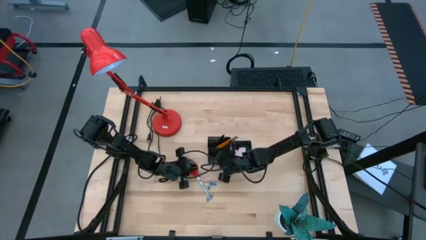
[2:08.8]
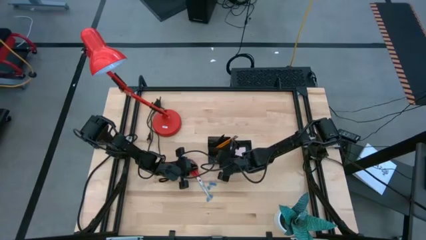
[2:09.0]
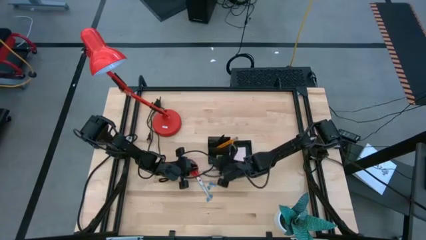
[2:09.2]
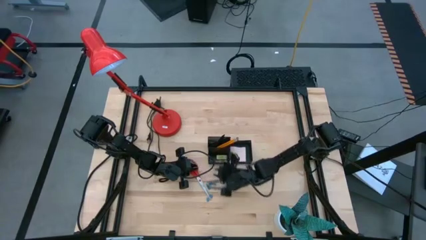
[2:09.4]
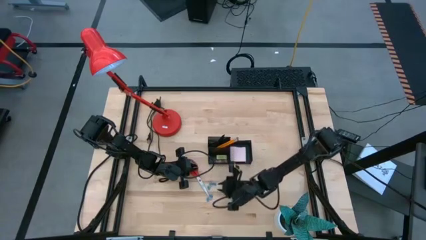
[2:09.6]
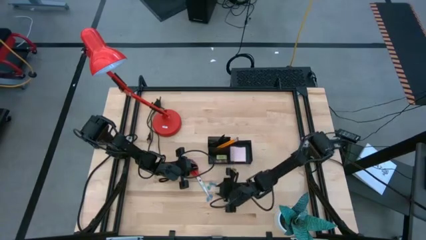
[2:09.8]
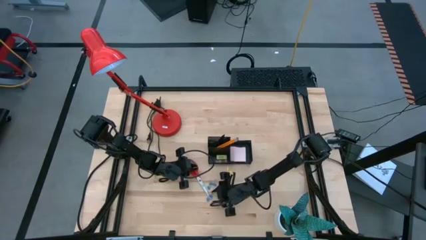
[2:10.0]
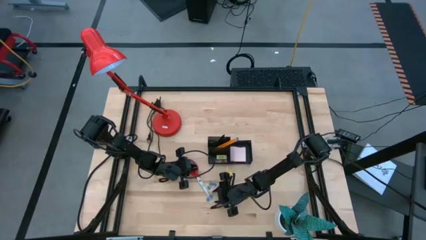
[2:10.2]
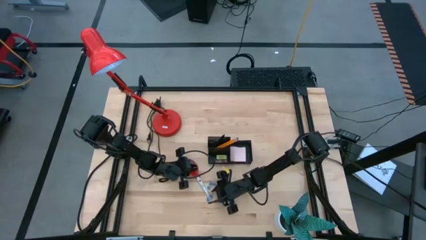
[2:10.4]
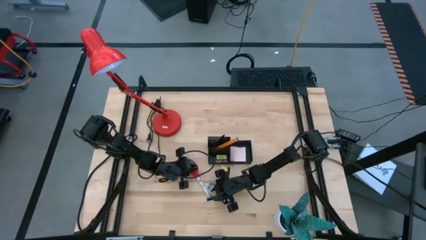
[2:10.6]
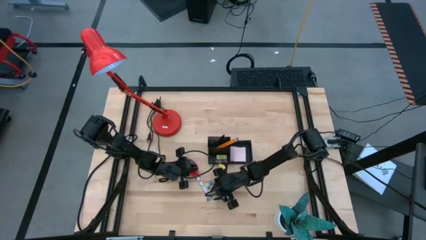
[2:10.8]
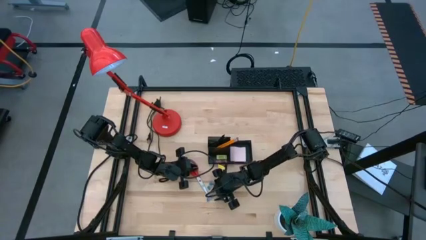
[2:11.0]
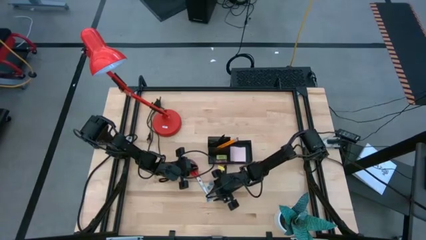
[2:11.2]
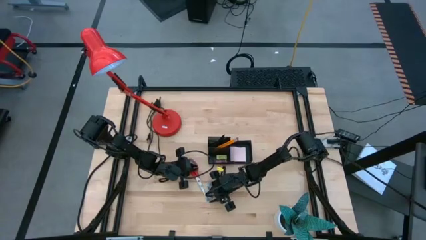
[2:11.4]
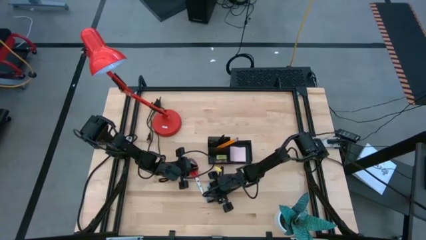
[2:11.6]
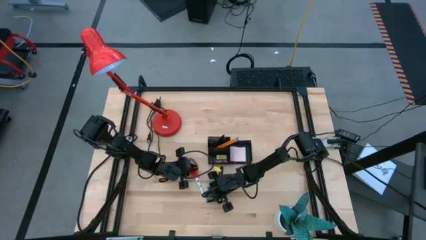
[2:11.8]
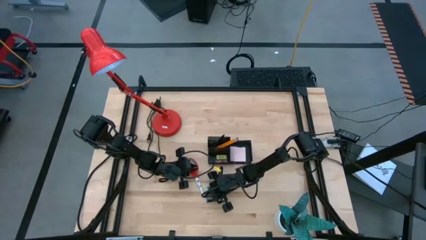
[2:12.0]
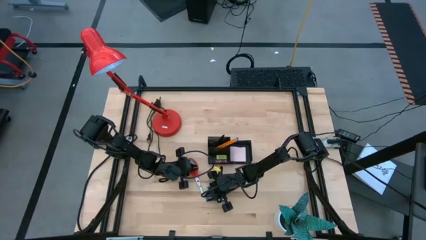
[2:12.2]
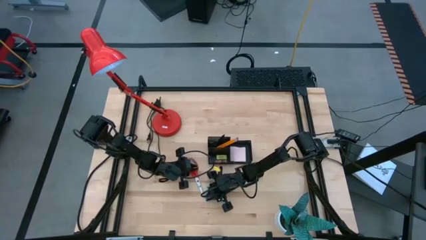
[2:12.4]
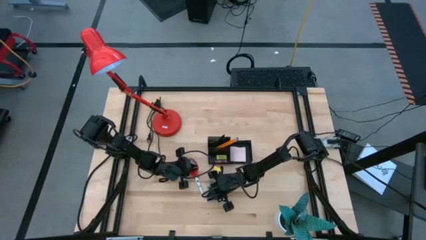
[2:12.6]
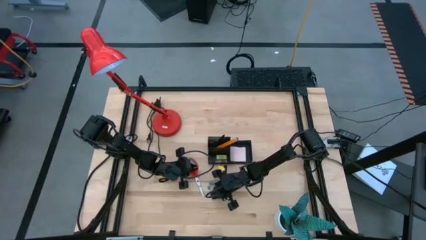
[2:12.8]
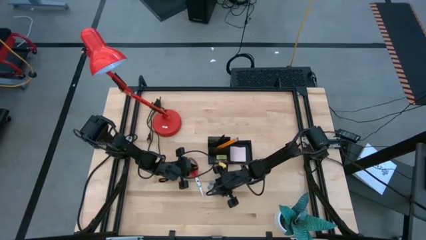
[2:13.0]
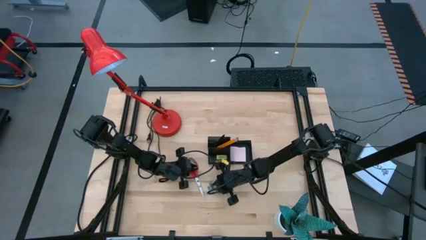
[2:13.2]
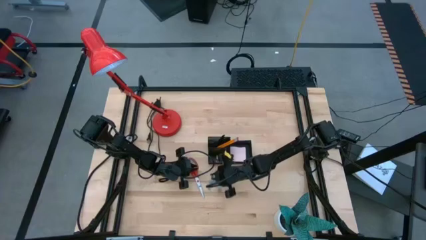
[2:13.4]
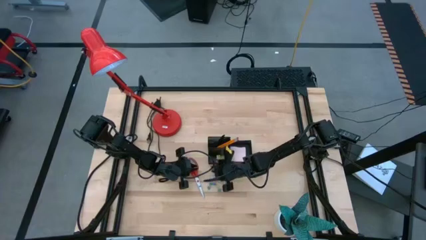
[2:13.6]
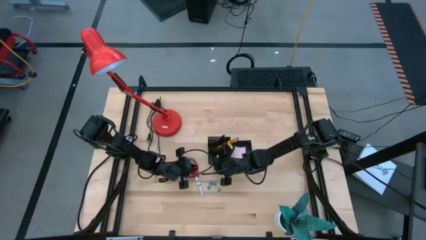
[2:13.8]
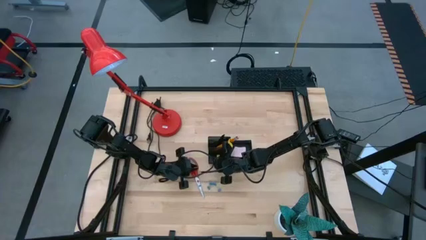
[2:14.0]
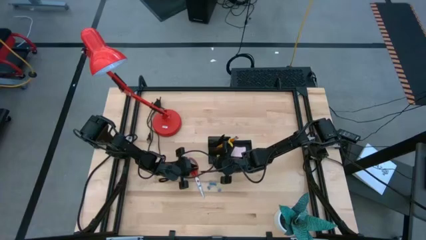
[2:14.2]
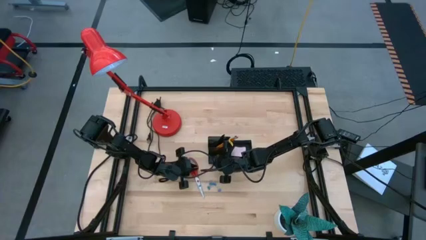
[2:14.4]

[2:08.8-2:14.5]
Task: Pick and place office supplies into organizer
Put the blue binder clip into the black desk organizer

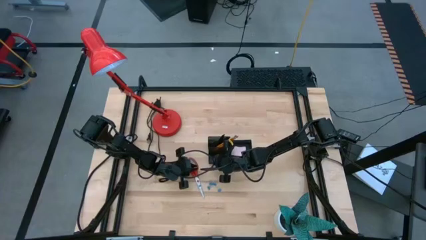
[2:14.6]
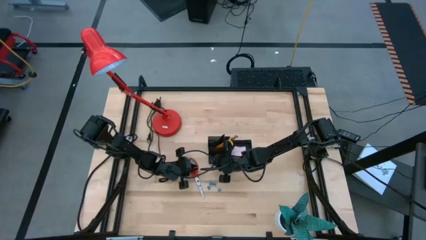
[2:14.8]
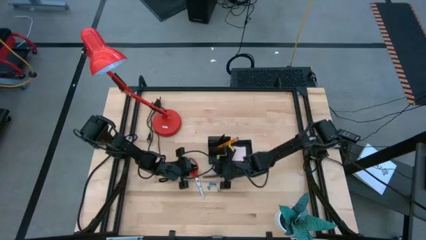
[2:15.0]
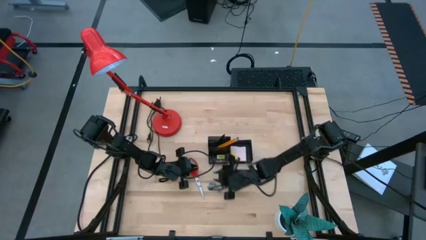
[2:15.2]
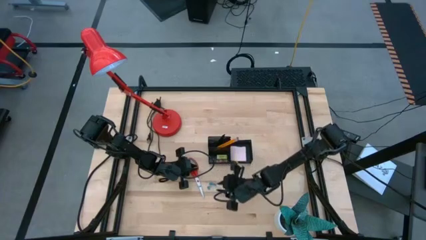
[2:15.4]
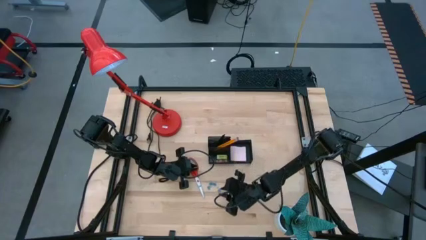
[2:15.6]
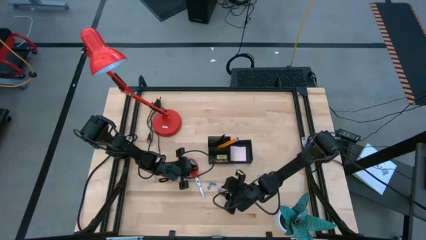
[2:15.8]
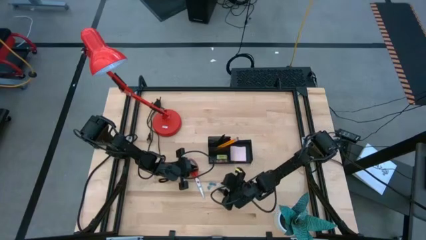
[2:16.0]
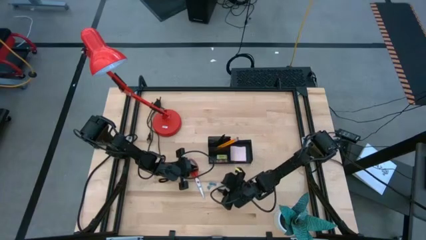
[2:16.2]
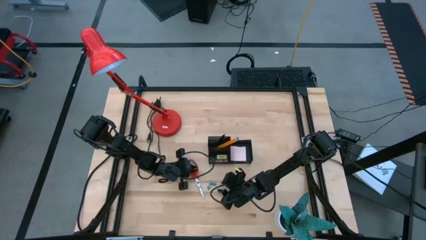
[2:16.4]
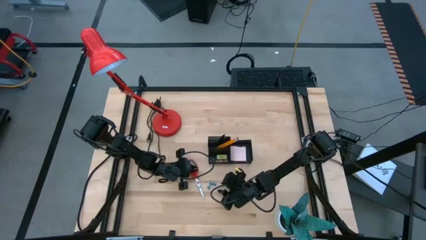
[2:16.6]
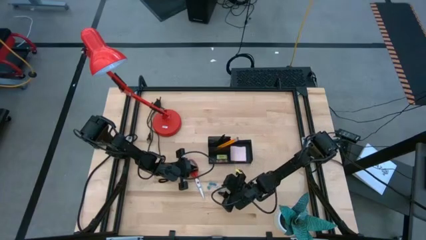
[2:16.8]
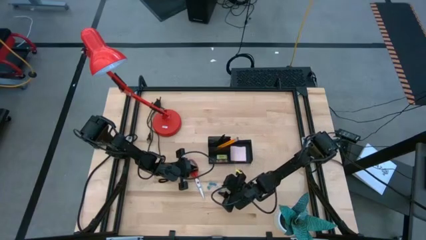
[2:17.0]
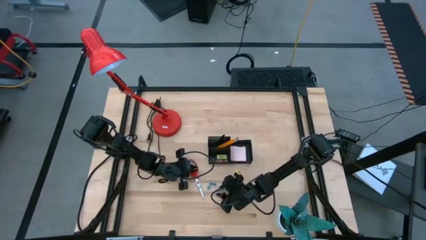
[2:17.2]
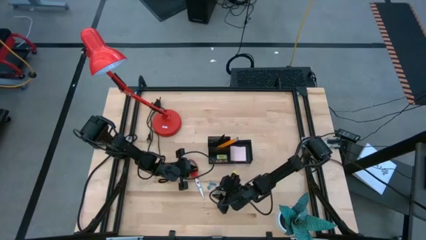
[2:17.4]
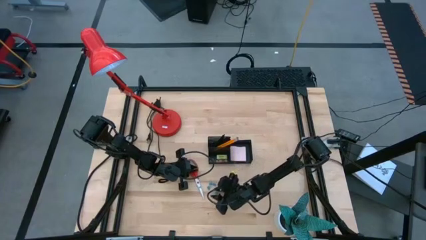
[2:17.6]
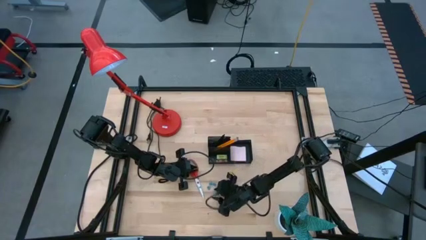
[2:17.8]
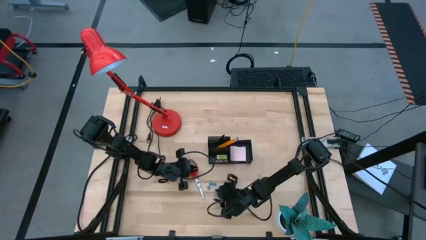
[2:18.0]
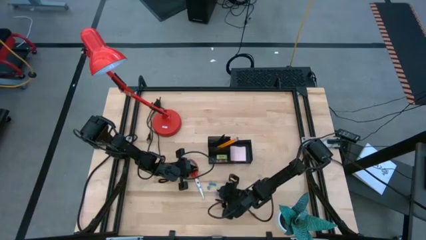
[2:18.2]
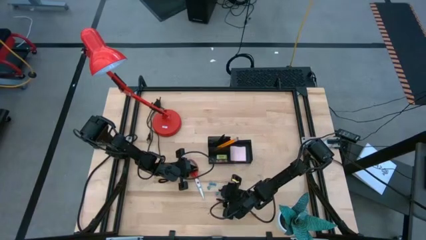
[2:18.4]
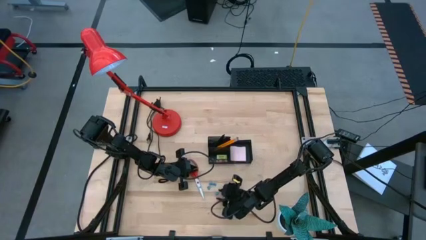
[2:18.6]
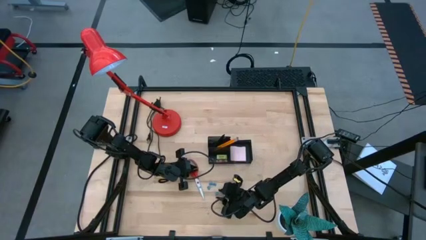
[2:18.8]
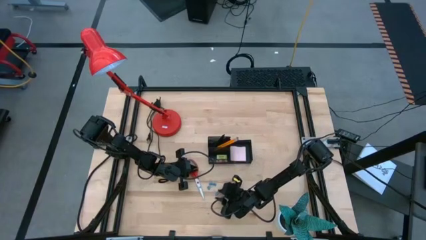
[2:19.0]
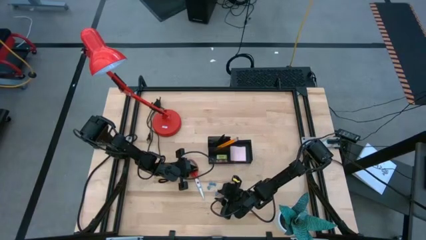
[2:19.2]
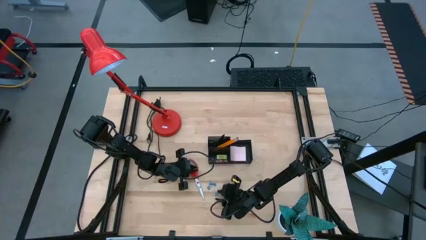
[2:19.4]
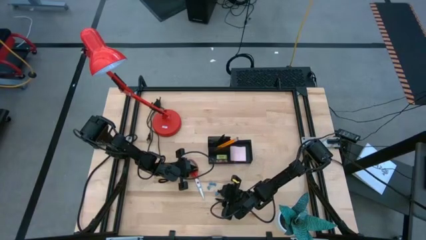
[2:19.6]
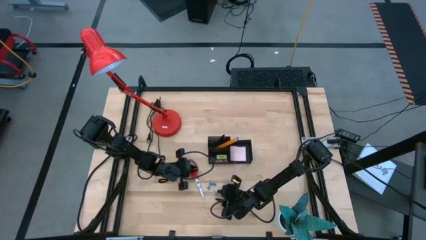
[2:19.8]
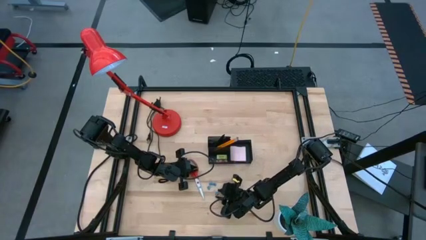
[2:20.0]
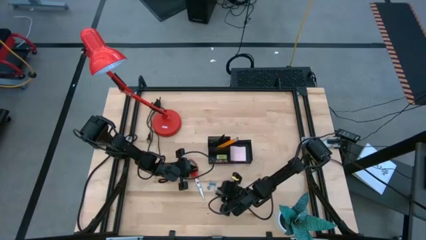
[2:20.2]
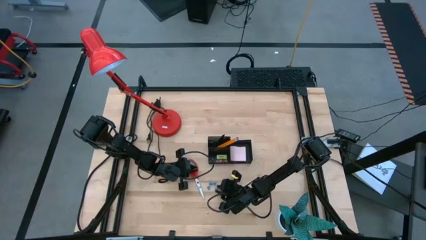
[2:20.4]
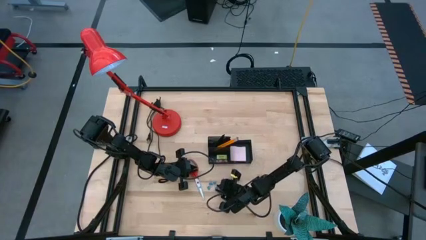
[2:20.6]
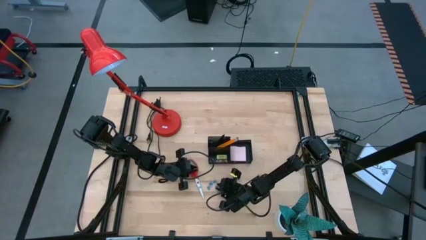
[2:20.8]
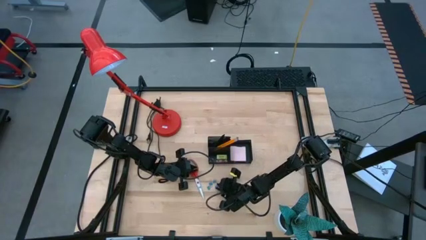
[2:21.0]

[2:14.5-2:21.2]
Put the blue binder clip into the black desk organizer

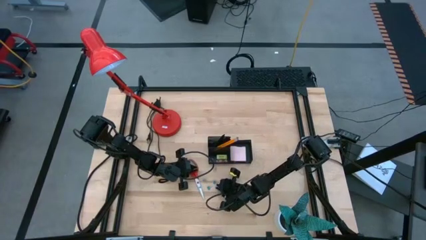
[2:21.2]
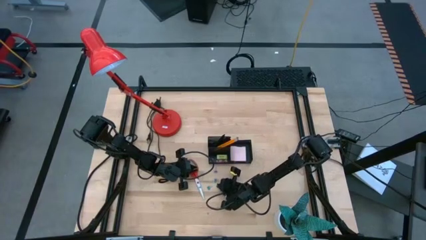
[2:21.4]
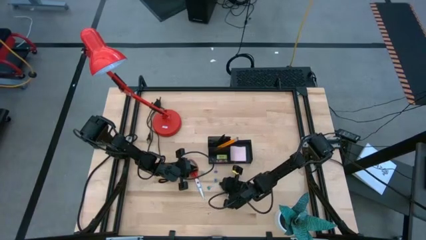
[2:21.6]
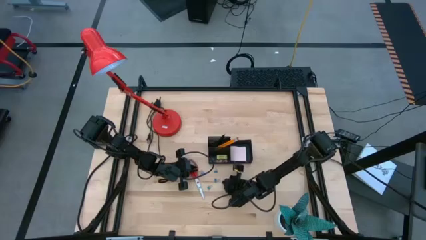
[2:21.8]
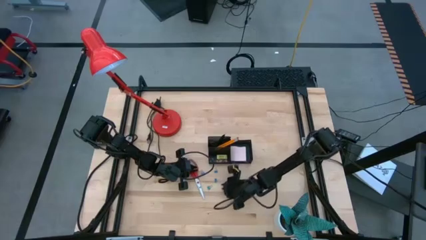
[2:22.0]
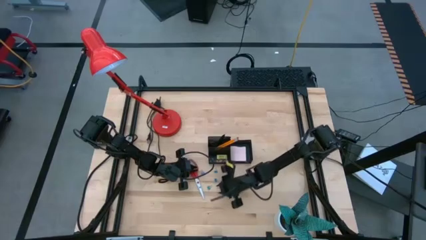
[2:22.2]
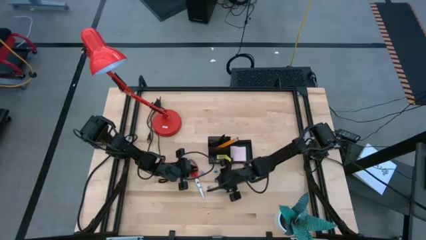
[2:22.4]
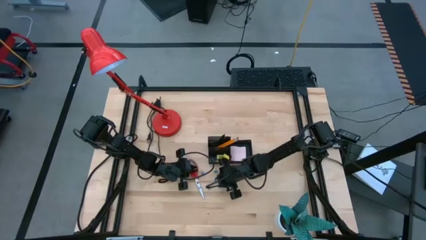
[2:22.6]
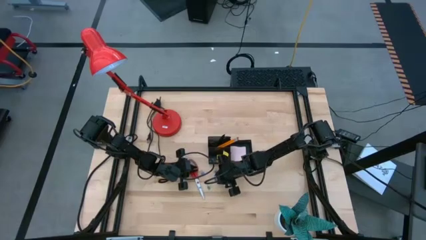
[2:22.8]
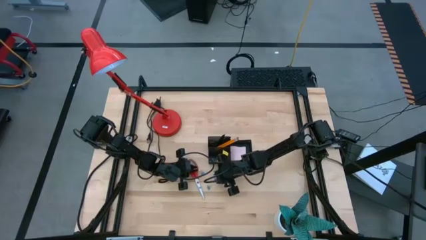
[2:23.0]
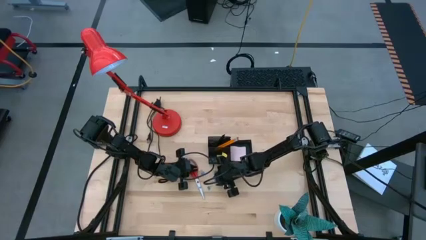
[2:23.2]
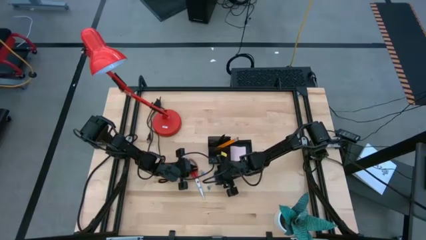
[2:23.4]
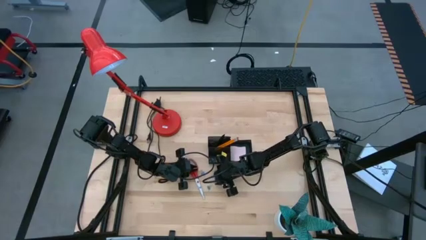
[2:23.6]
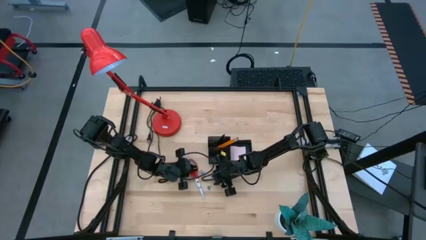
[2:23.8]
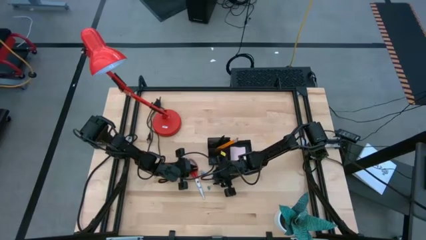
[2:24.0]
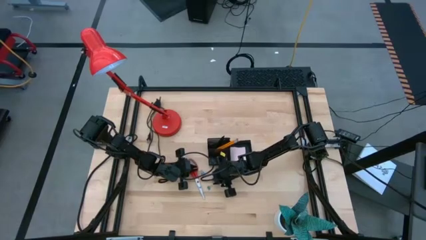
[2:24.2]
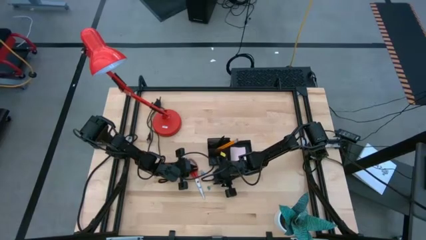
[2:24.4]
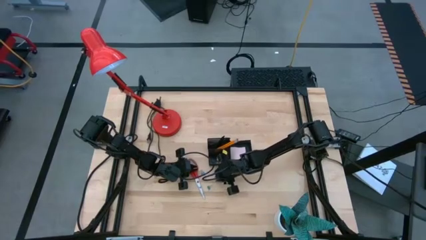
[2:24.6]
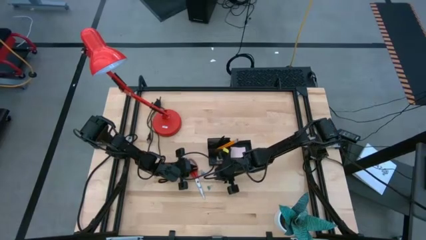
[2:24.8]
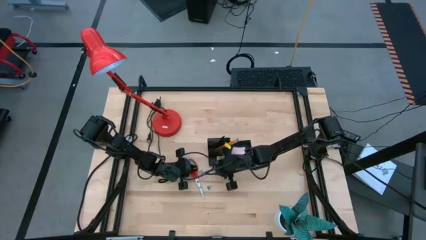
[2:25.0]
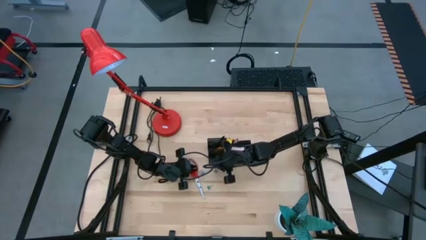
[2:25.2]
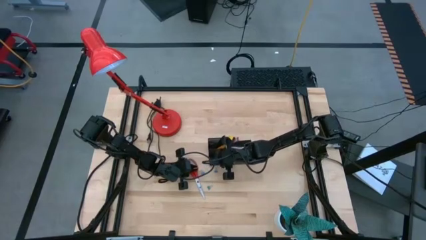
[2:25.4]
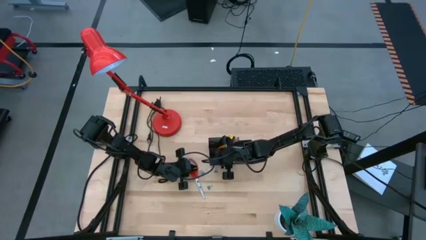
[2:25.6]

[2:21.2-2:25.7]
Put the blue binder clip into the black desk organizer
